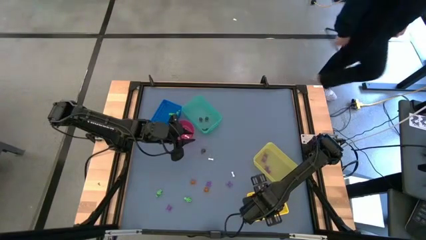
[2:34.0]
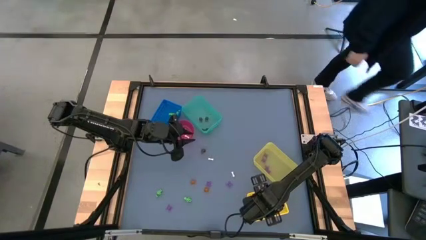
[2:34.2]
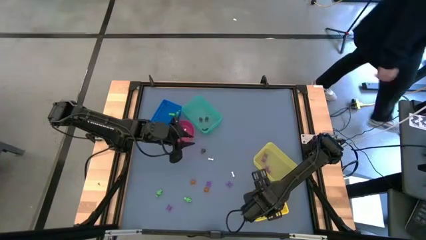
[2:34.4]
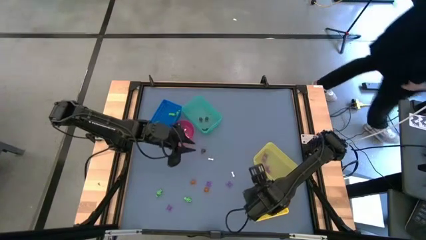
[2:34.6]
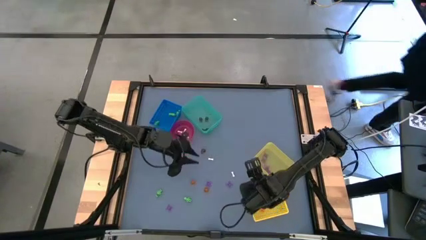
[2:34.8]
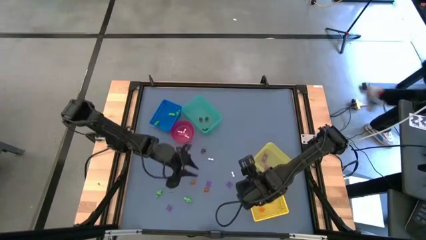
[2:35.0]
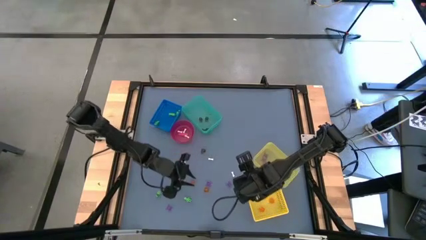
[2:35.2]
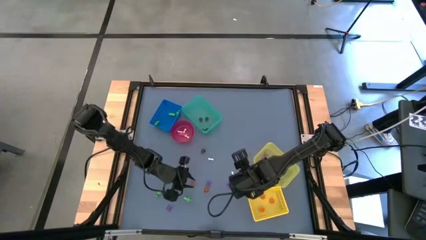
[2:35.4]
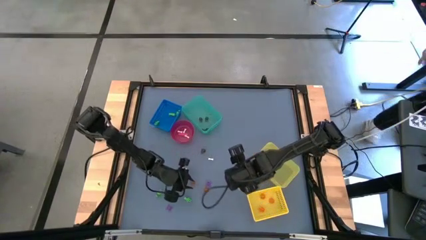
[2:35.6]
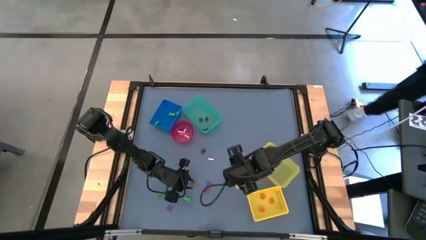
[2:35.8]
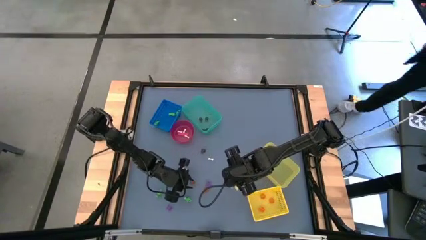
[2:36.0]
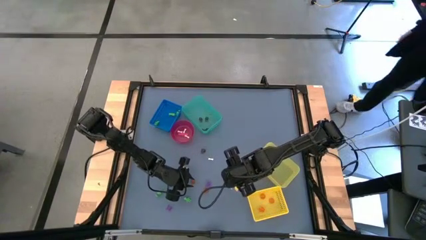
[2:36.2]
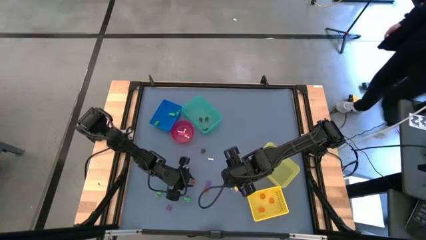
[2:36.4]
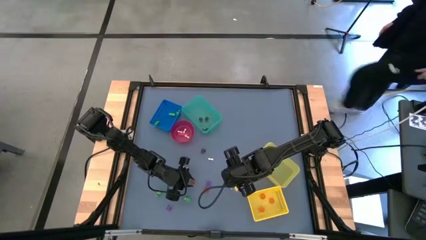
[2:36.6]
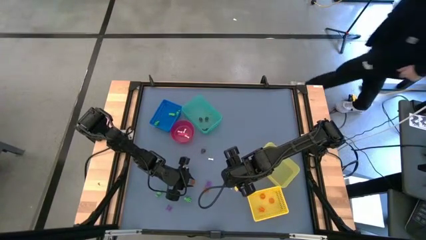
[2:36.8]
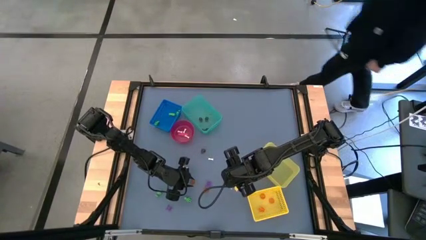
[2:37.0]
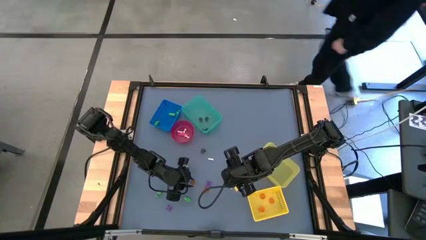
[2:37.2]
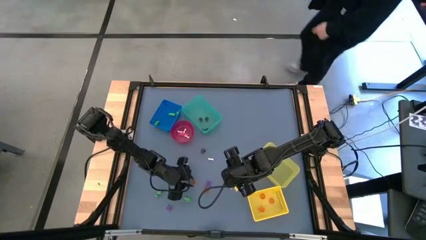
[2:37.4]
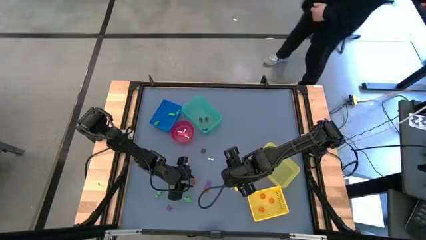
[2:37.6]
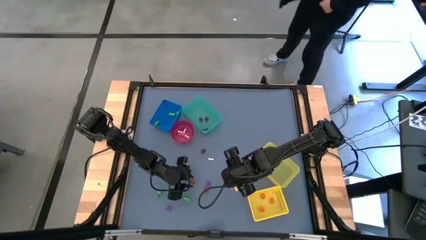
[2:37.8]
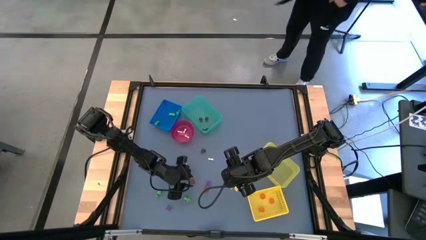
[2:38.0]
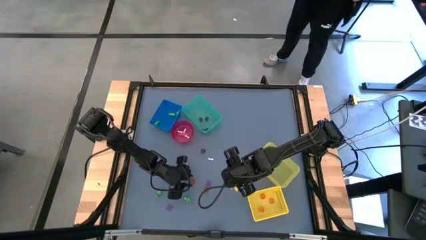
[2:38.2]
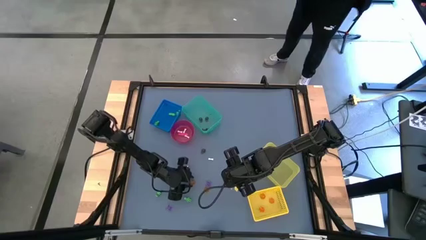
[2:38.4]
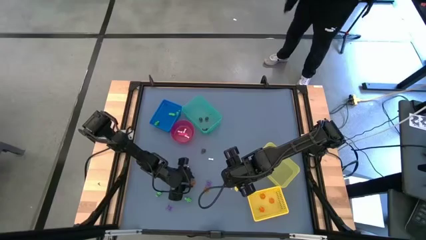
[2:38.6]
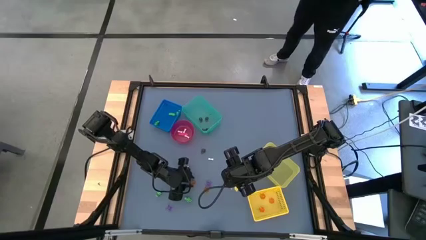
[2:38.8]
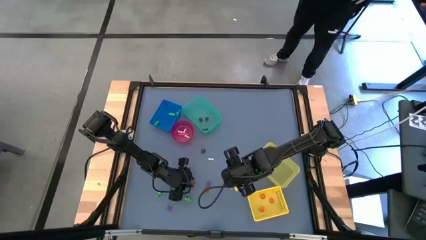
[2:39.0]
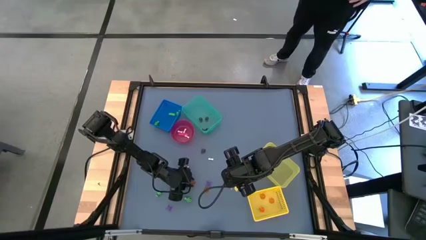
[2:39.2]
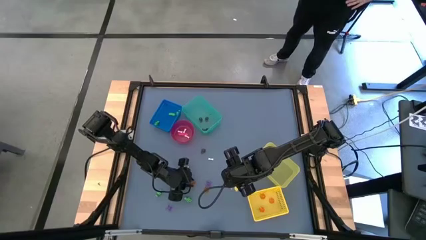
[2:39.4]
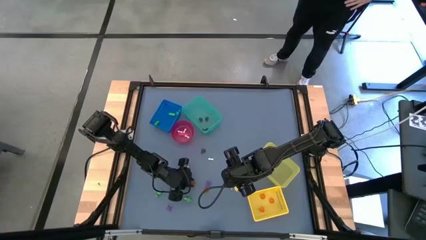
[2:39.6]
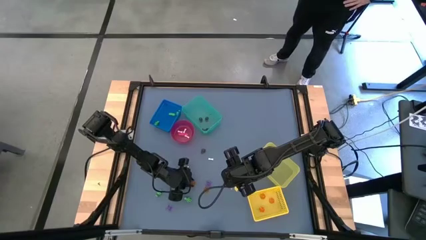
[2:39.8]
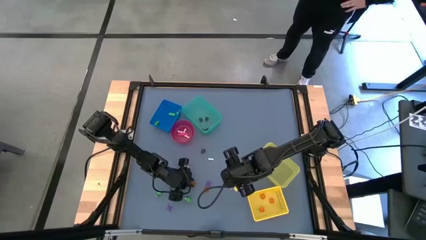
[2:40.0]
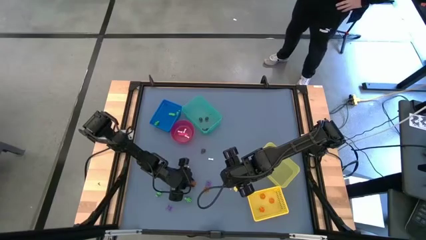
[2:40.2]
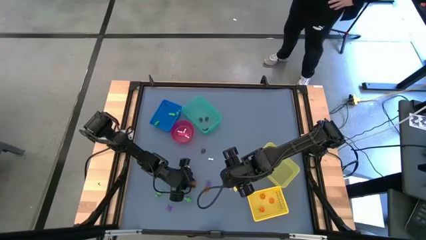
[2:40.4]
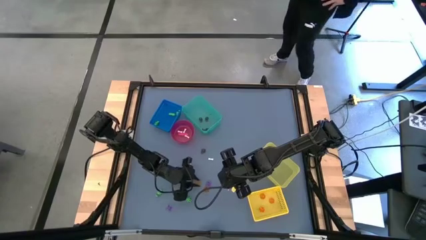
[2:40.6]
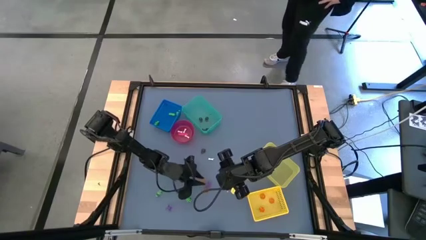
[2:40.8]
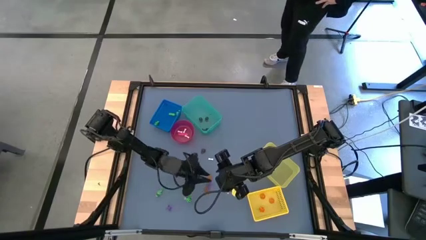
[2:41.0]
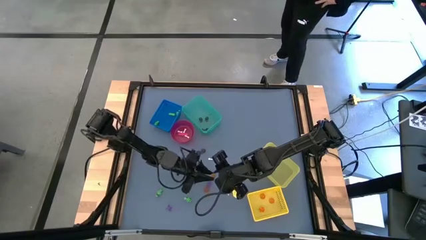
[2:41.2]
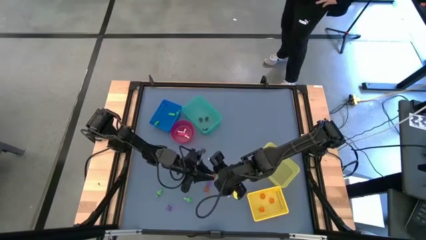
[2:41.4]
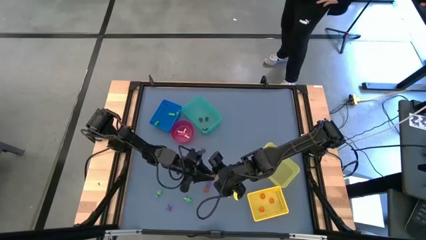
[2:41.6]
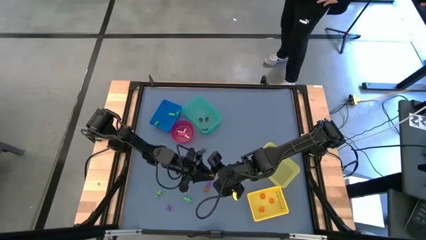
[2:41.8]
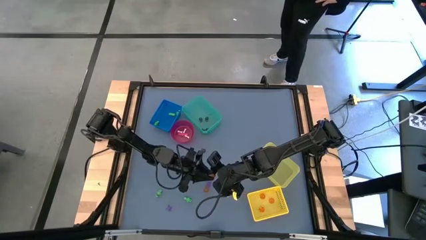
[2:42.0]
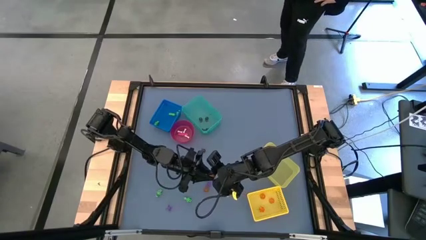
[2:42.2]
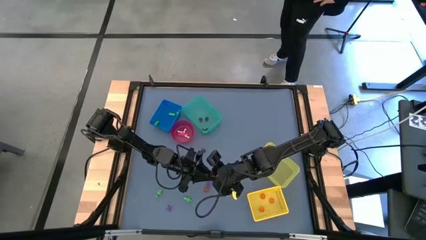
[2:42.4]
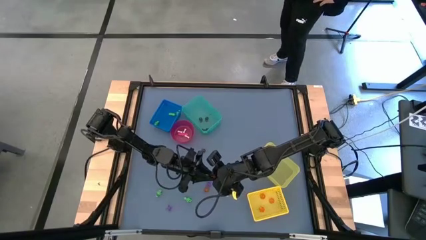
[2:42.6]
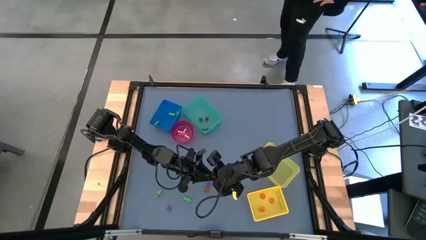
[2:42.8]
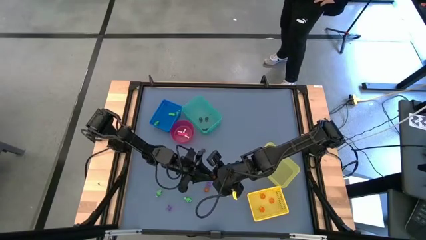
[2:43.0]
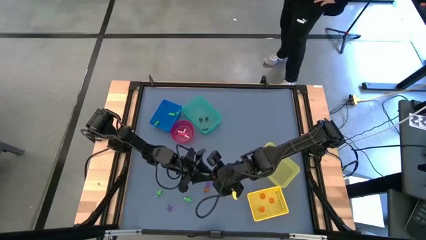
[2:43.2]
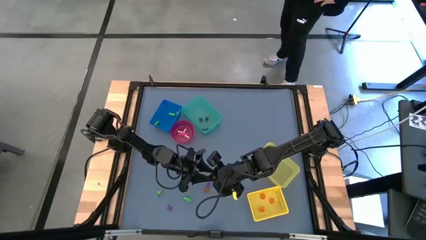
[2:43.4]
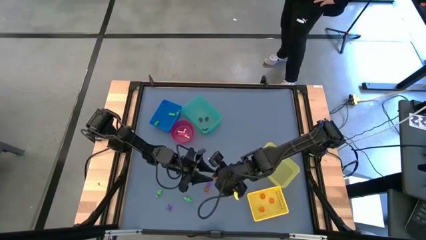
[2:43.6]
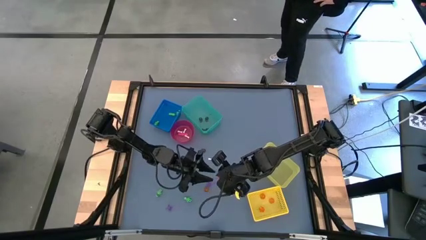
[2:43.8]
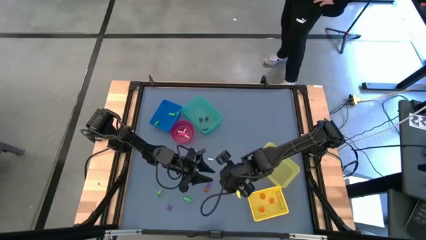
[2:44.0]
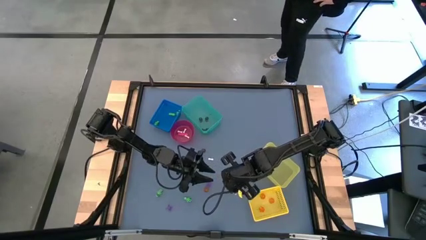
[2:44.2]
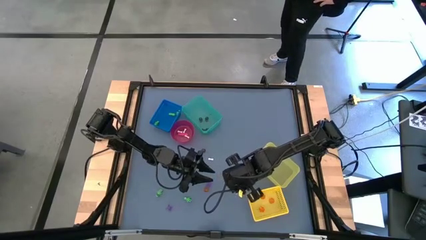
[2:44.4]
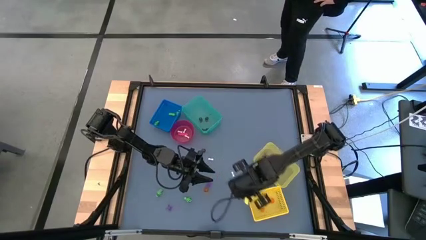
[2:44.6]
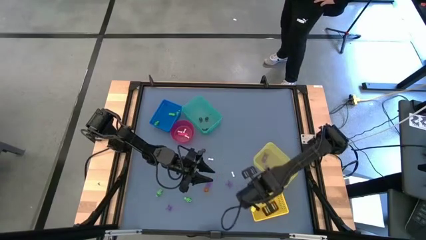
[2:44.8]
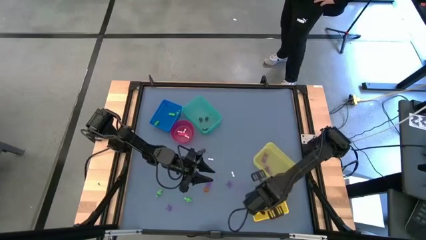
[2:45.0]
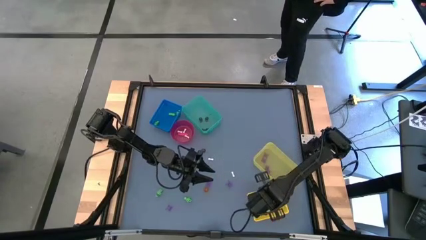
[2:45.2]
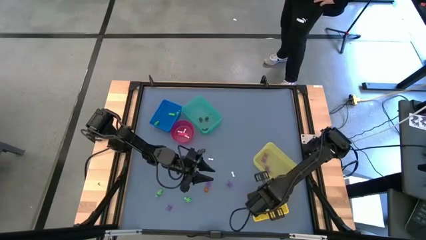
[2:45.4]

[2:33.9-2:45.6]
Task: Sort Halloween decoration
Put the orange pumpkin toy into the yellow bin

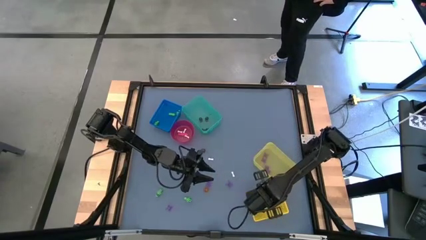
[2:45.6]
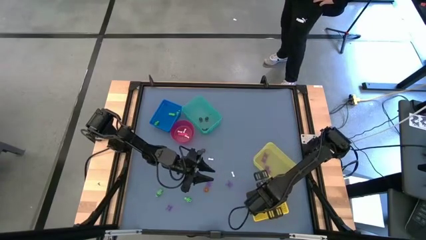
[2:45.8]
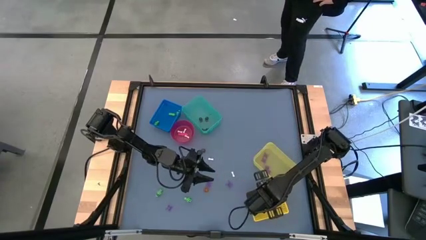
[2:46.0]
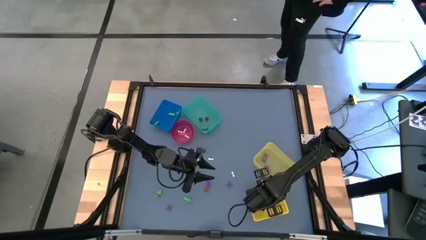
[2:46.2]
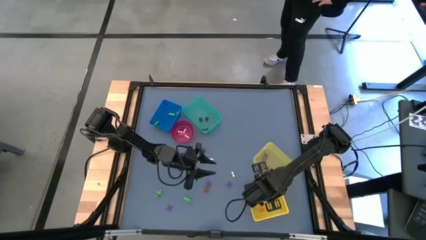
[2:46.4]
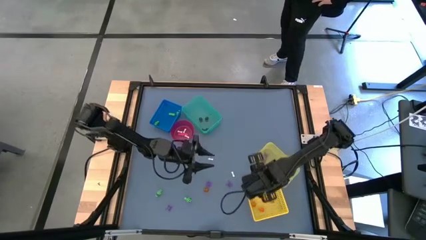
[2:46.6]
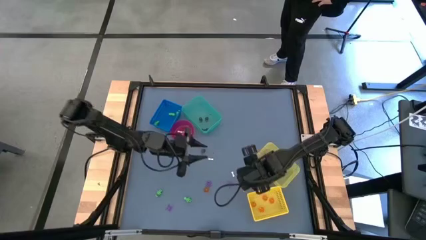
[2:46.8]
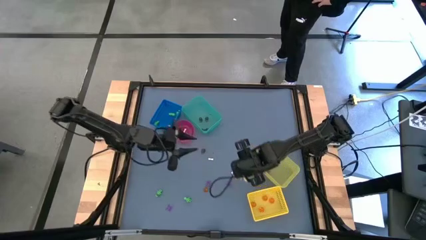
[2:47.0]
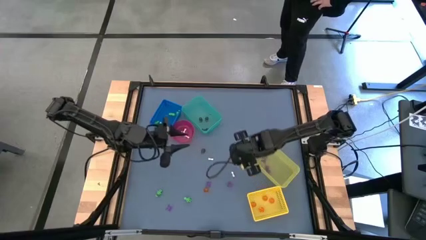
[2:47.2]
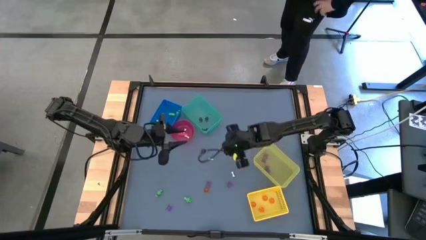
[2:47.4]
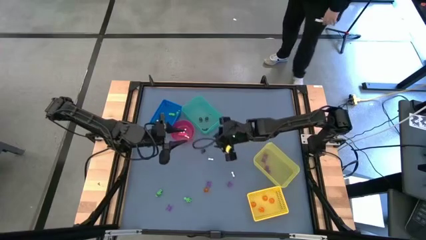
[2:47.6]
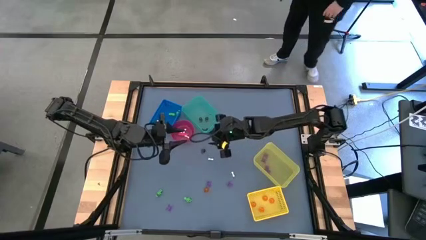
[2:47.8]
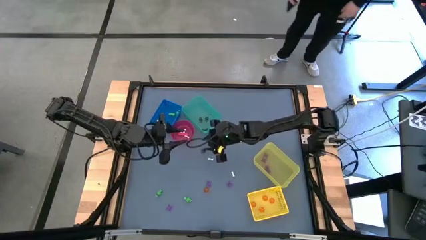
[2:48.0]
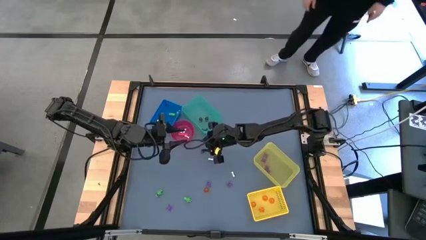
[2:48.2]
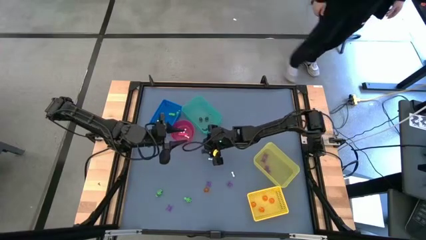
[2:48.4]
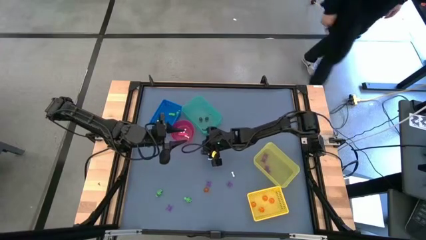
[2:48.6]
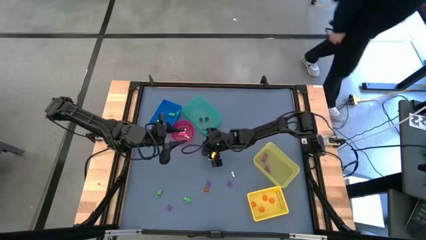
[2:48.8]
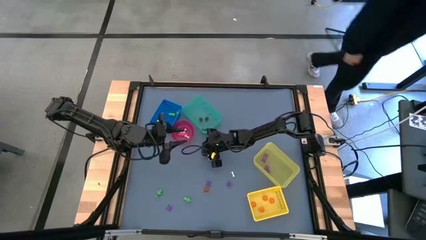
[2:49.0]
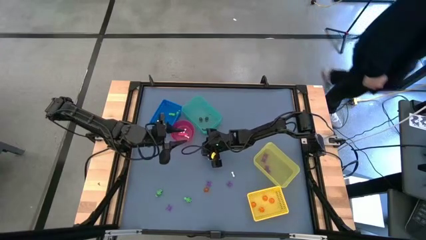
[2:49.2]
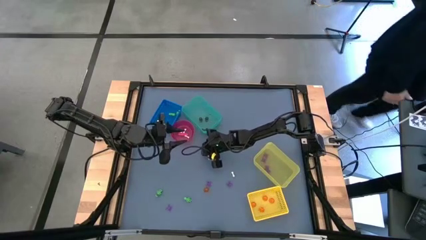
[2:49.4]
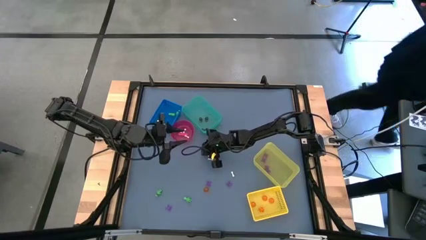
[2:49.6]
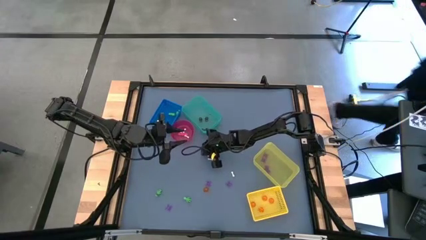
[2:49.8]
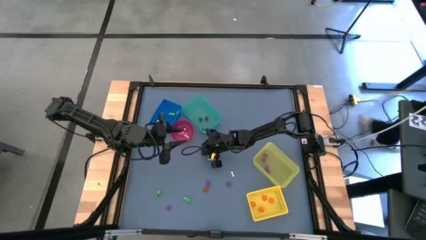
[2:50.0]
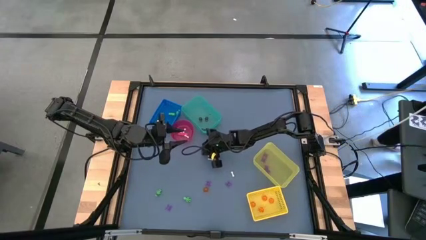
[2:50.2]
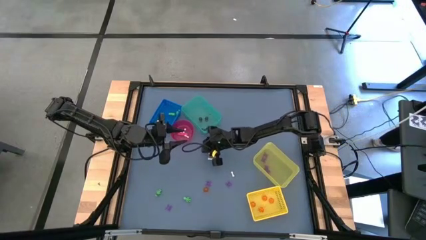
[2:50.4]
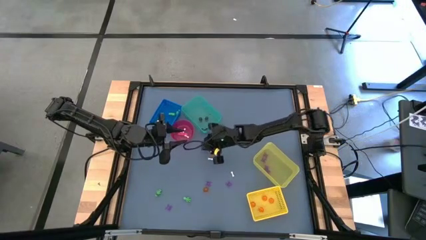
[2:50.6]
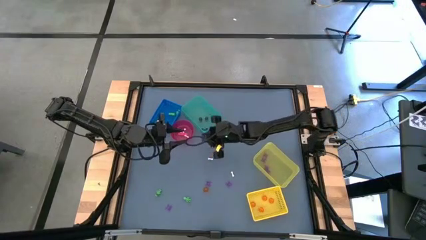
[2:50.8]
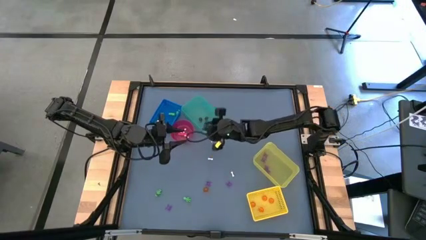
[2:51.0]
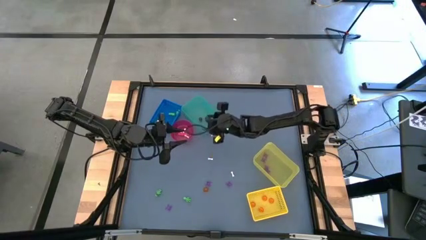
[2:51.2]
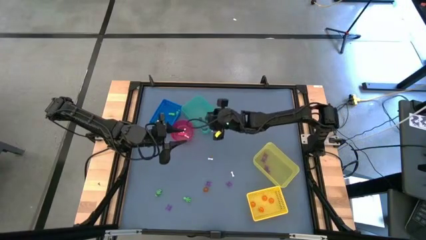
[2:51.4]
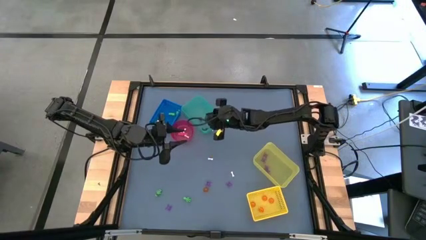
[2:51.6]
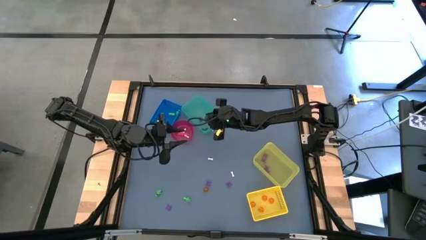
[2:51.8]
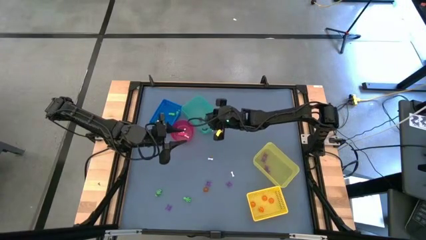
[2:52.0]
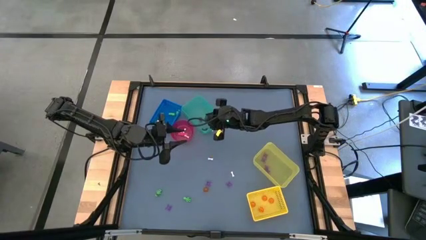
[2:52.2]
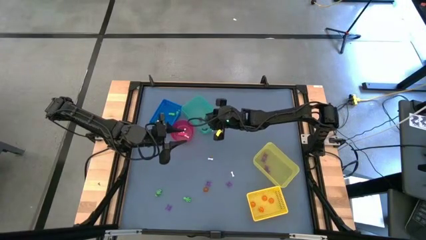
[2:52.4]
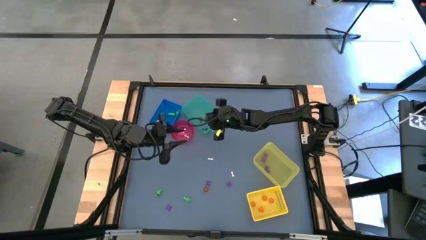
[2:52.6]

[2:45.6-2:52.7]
Put the black skull toy into the green bin
